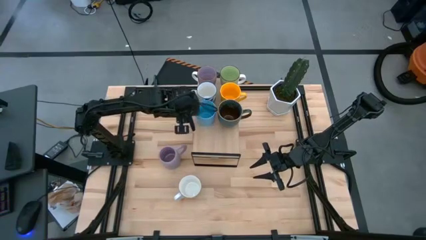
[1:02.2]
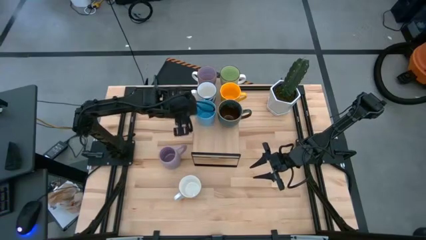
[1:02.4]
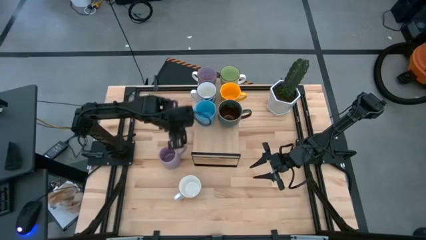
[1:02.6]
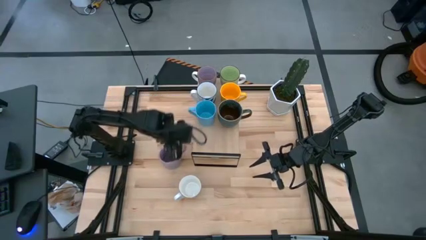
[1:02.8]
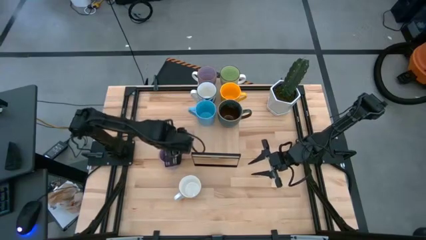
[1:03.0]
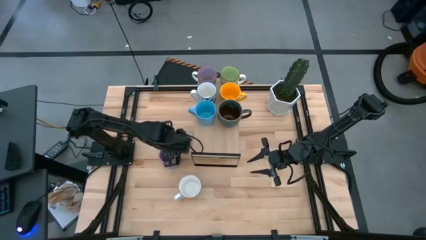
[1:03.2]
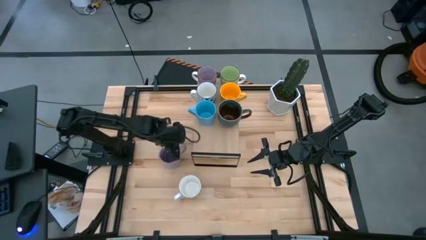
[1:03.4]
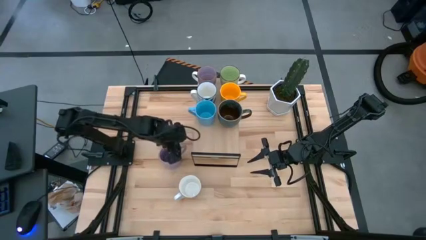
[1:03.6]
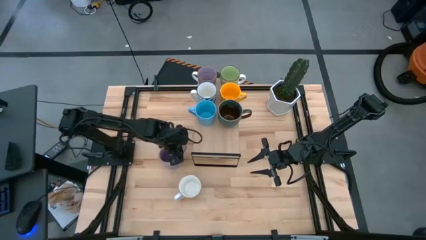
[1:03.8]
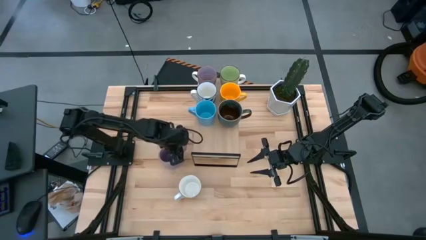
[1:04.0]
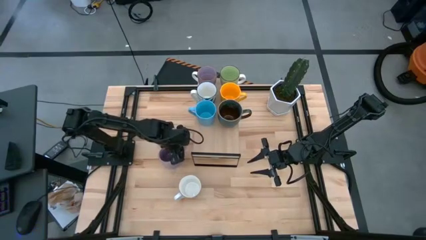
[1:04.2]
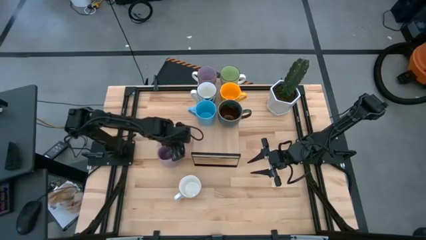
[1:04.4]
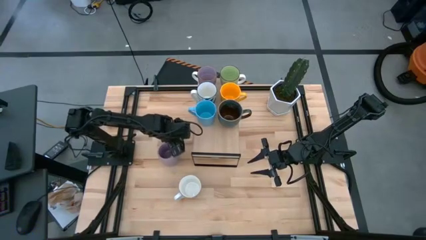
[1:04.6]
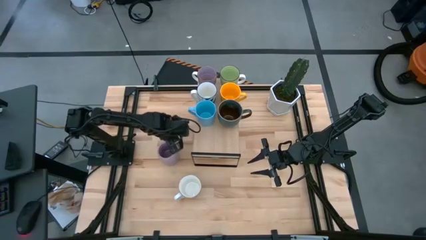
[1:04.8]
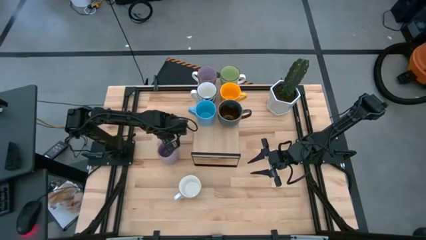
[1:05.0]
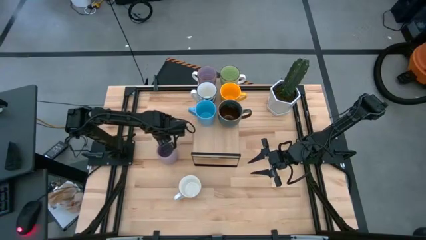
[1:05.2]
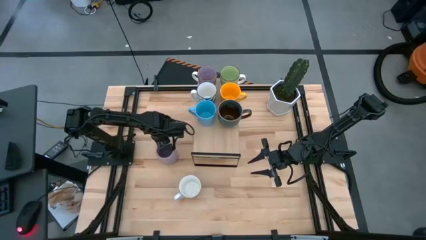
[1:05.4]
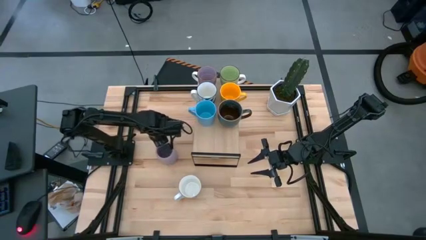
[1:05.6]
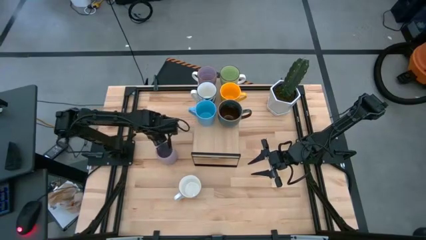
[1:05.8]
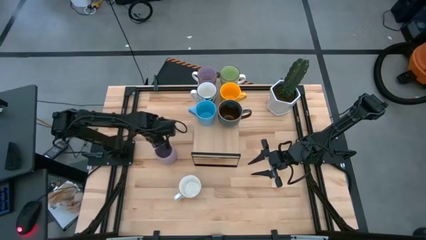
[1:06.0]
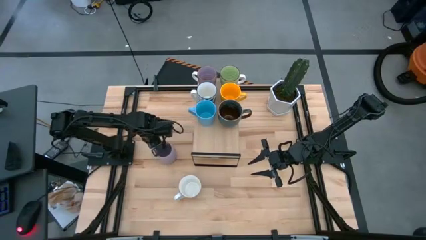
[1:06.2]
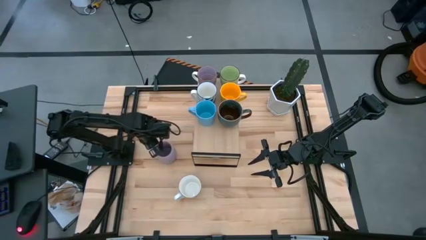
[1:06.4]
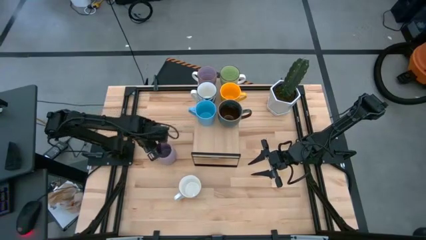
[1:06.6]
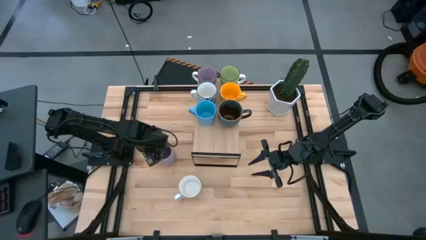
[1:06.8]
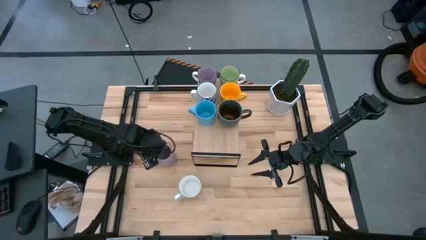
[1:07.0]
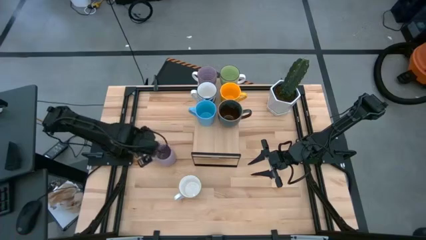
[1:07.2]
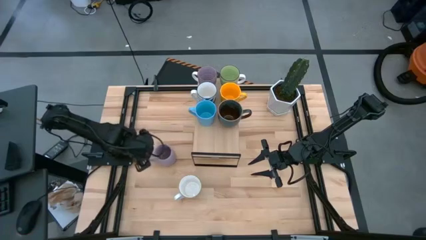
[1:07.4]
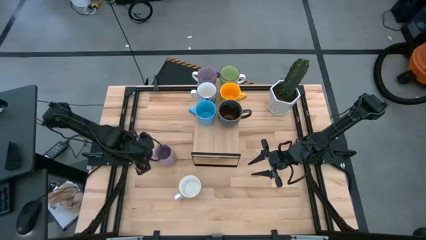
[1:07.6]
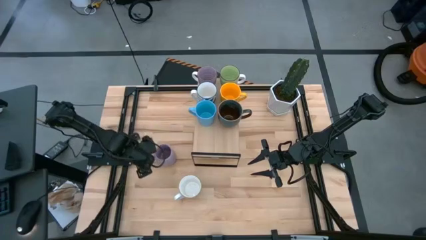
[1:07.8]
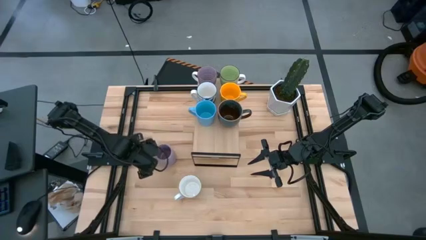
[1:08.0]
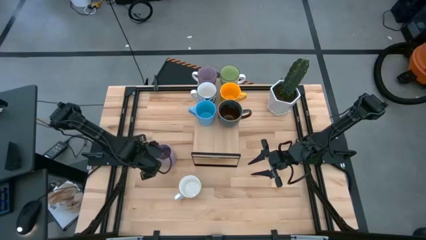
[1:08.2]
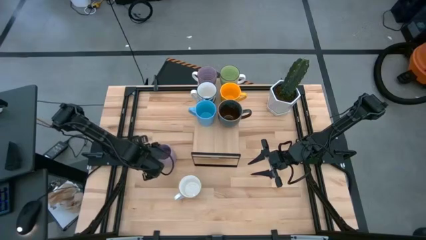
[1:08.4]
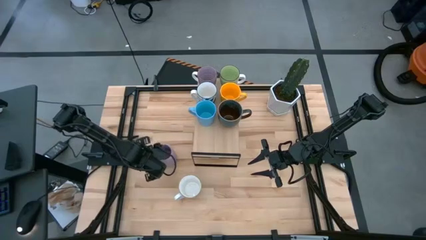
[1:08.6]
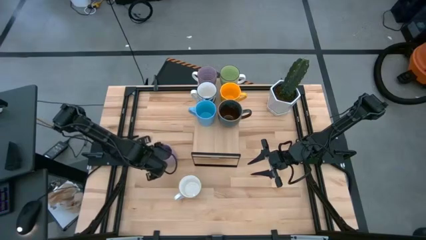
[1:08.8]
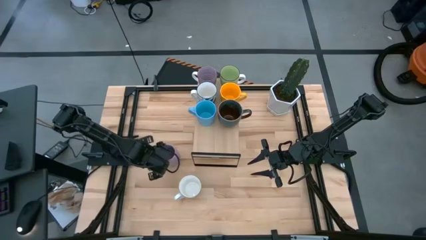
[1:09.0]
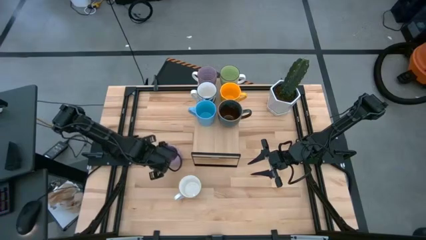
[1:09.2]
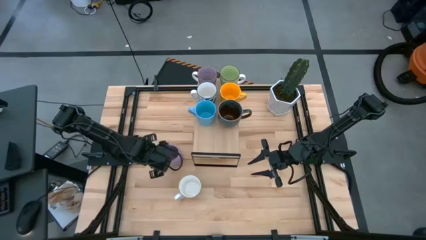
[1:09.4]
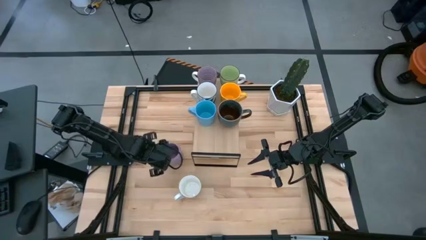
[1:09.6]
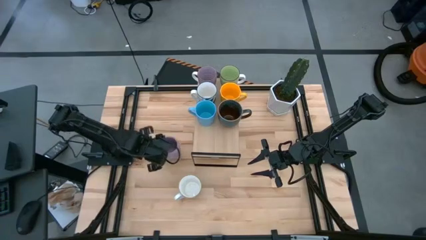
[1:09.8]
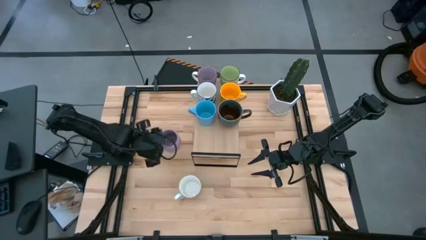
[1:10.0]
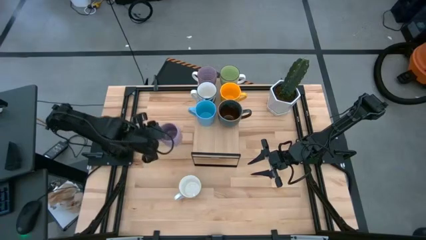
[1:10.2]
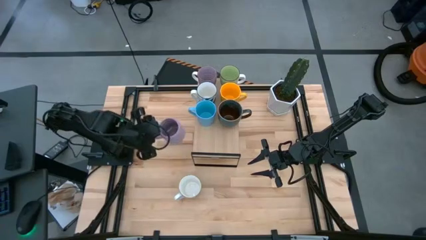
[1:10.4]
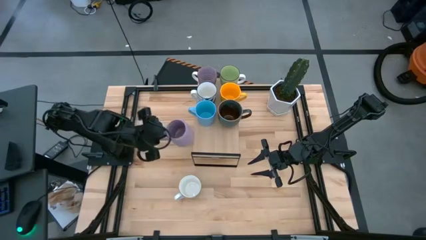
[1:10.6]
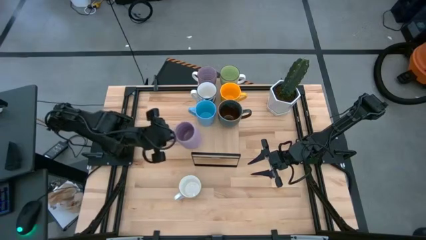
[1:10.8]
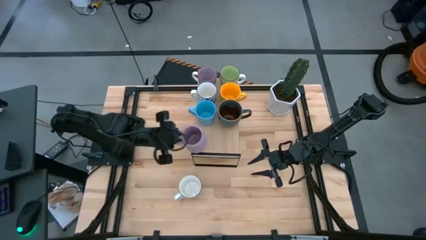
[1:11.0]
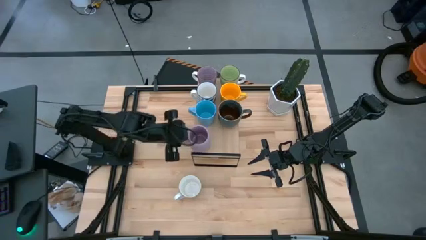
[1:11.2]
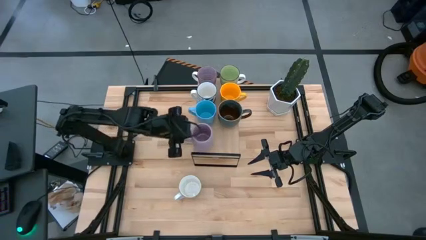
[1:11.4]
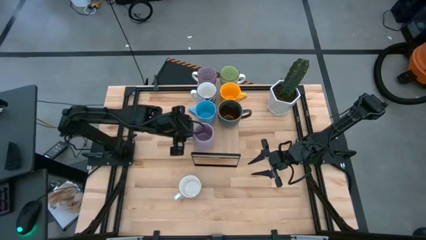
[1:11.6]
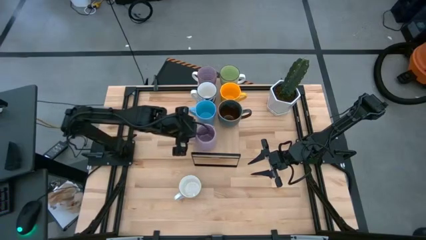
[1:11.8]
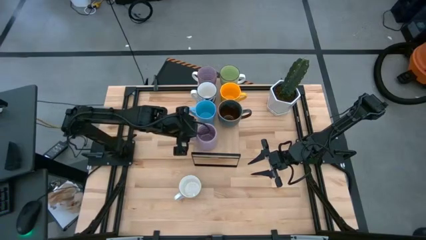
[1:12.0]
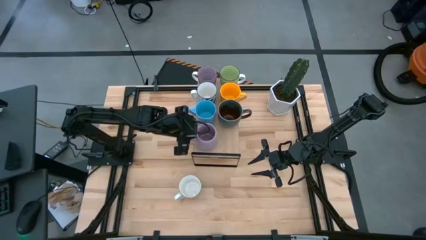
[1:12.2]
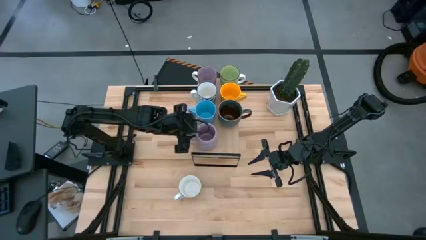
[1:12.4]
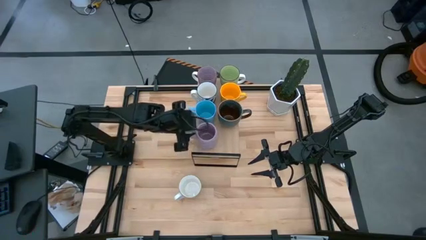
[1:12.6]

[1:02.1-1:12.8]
Task: Place coffee mugs
Put the purple mug on the shelf

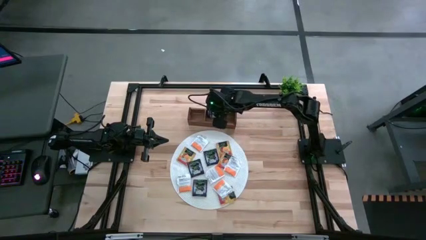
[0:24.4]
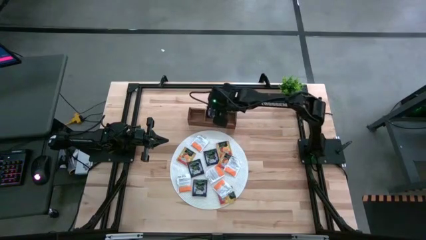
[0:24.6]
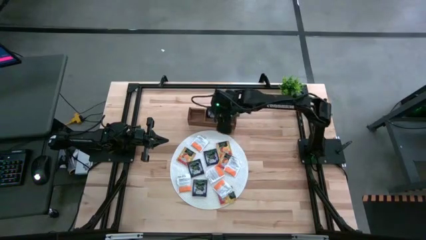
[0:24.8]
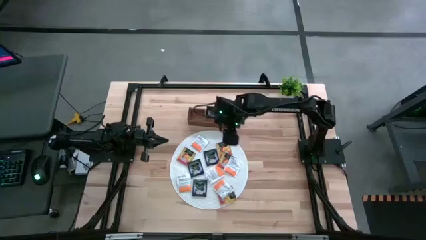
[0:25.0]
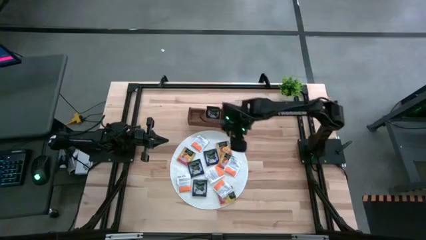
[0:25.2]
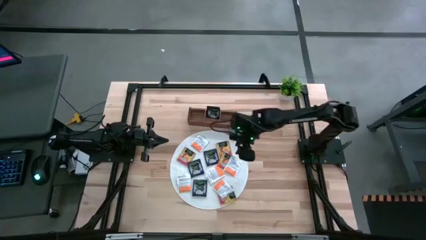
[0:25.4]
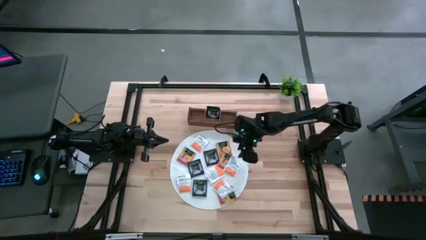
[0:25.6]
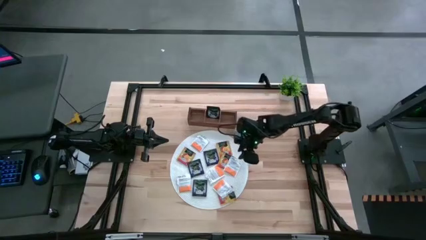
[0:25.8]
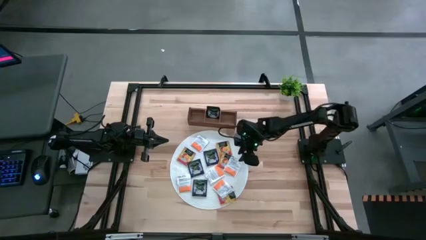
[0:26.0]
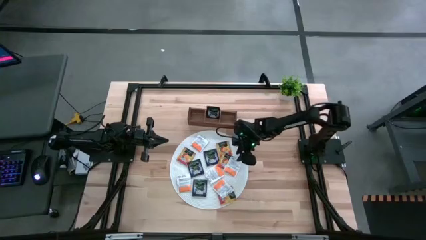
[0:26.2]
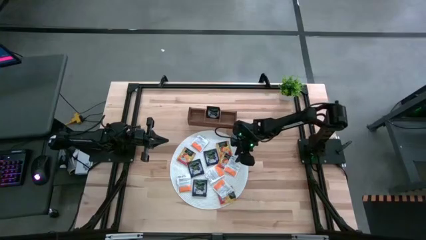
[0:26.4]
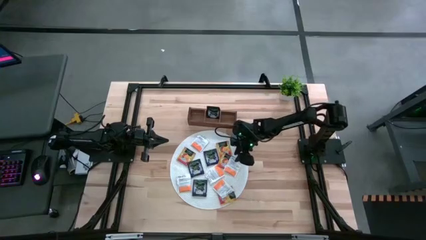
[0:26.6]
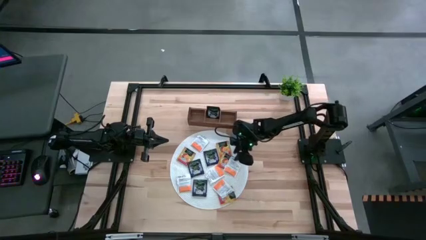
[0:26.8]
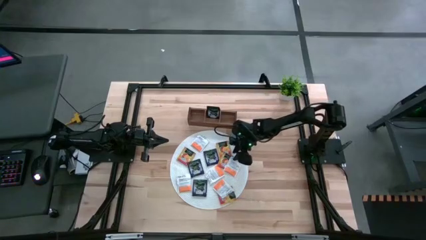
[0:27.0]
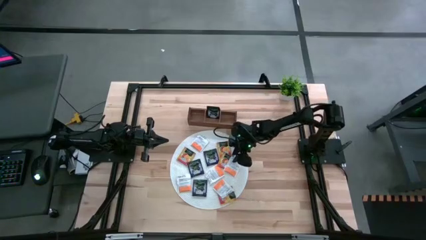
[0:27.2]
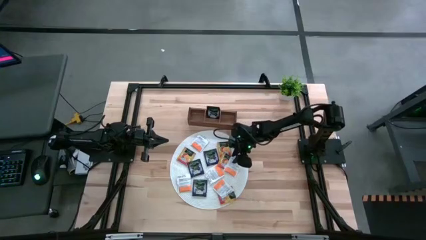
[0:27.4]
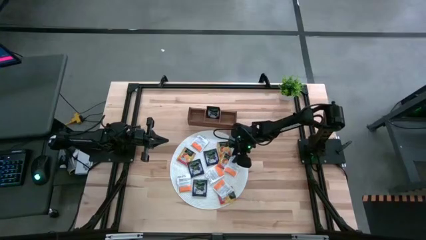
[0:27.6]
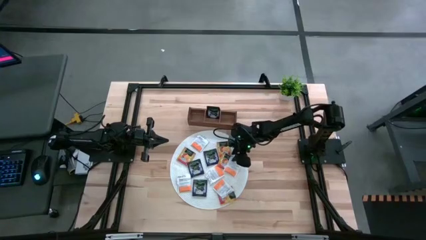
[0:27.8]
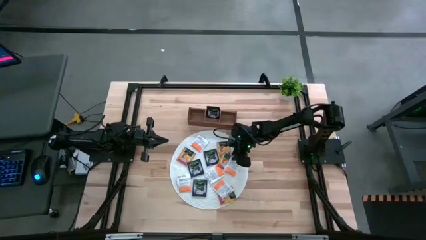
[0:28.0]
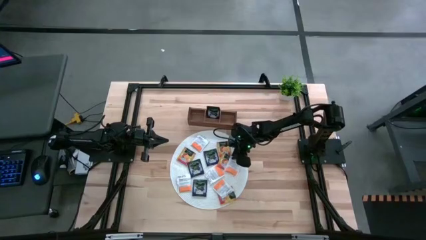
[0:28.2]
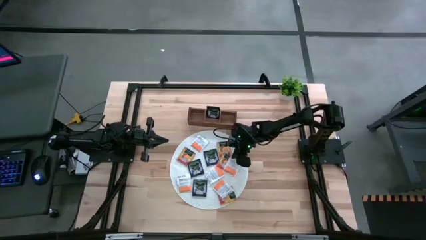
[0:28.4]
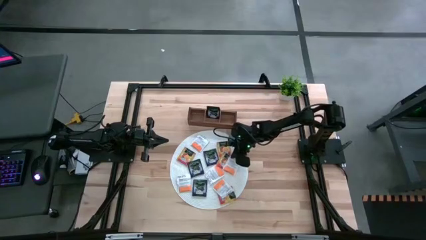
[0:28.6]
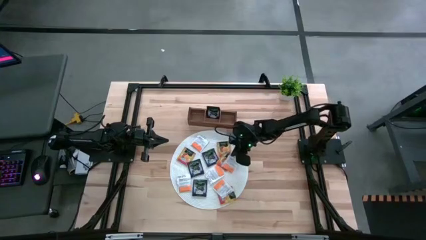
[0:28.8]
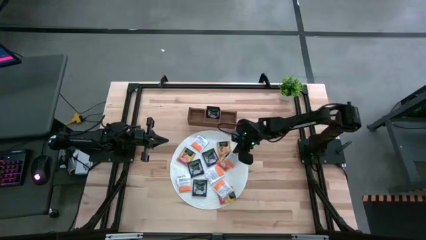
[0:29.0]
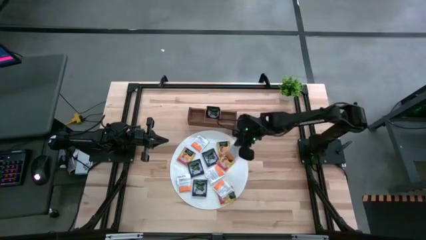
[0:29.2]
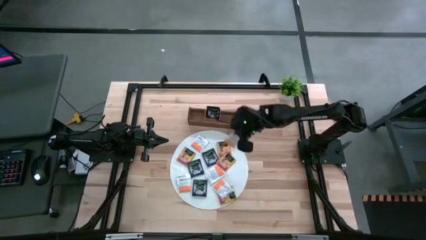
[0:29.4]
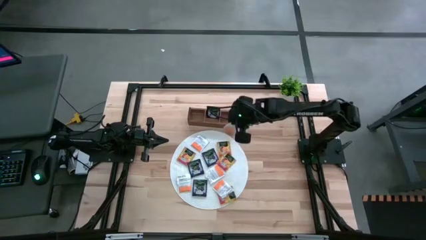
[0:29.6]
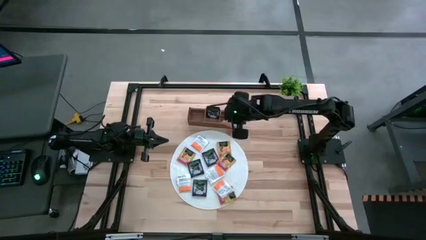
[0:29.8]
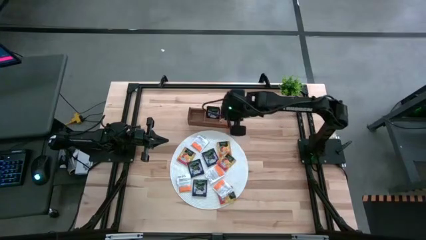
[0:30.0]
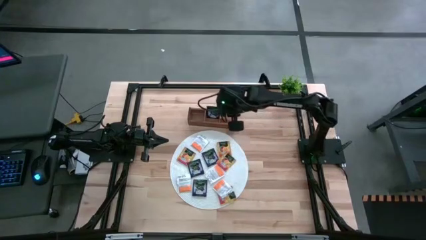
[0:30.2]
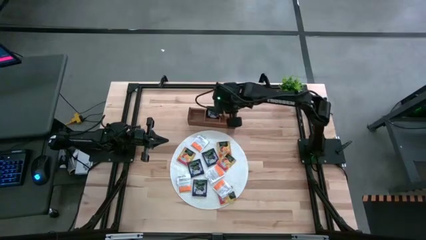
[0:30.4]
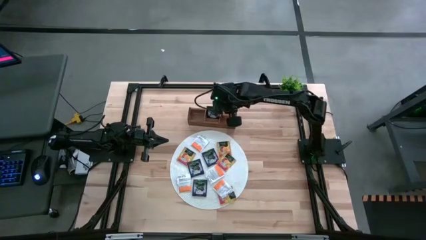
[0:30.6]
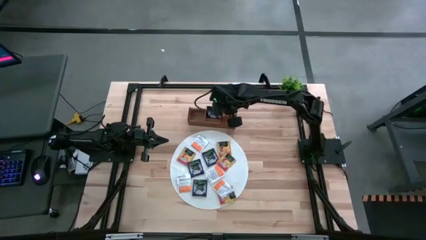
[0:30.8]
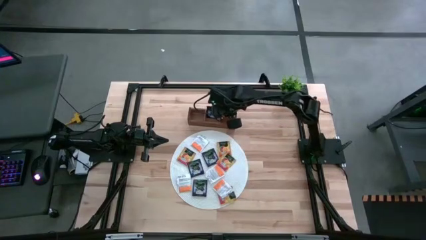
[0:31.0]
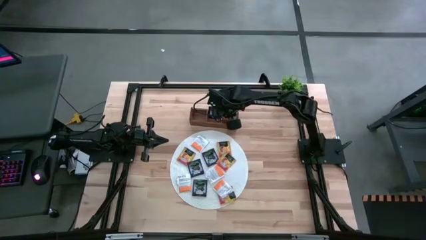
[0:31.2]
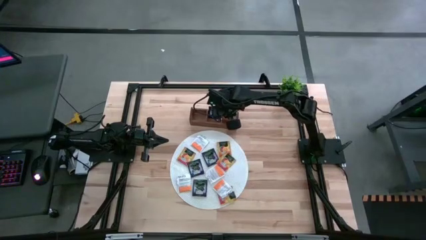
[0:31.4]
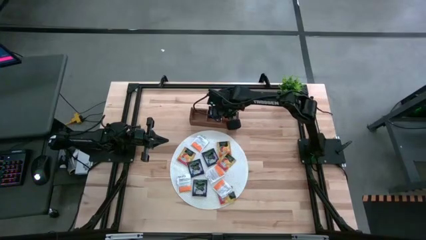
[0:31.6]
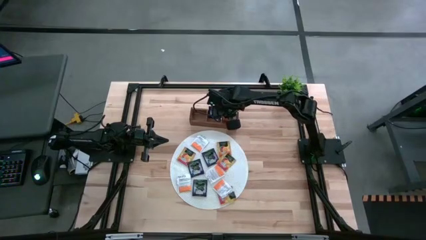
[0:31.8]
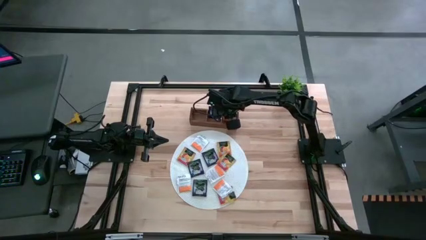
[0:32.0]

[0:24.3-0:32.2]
Task: Pick & Place Tea
Put the white tea bag into the right section of the wooden organizer
